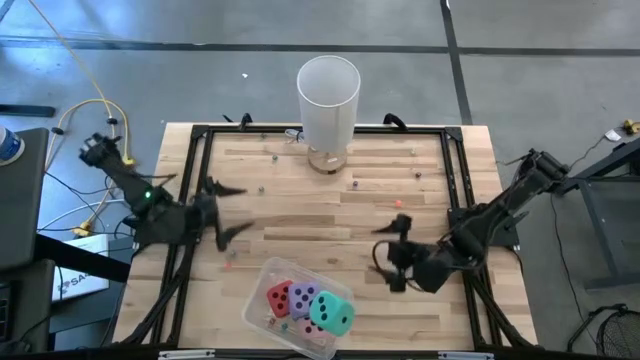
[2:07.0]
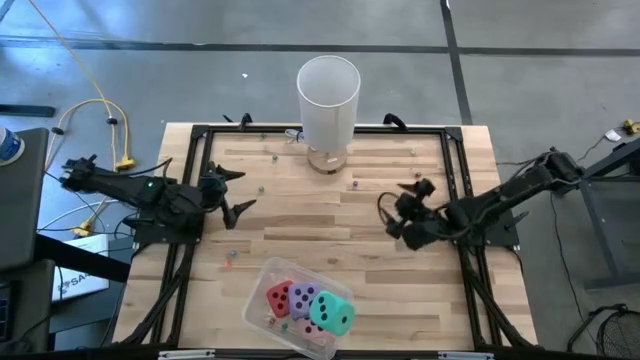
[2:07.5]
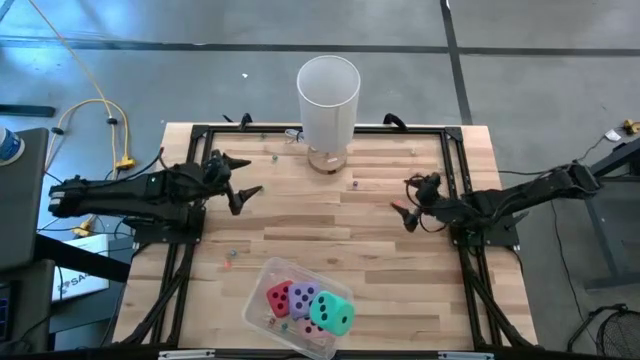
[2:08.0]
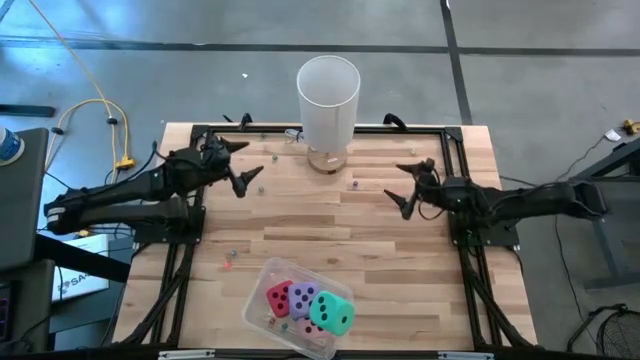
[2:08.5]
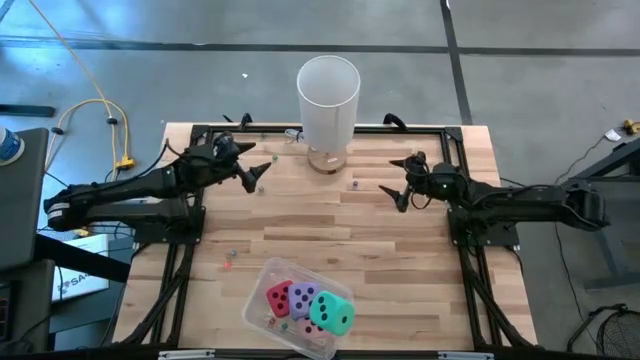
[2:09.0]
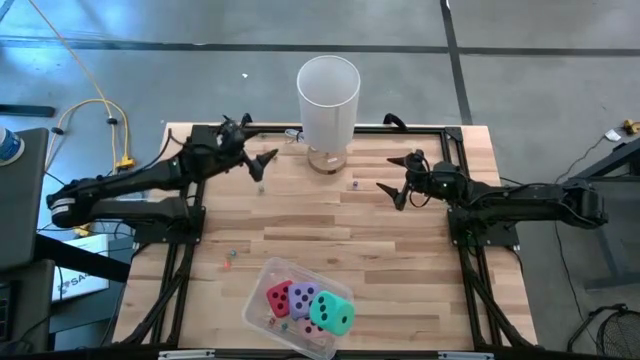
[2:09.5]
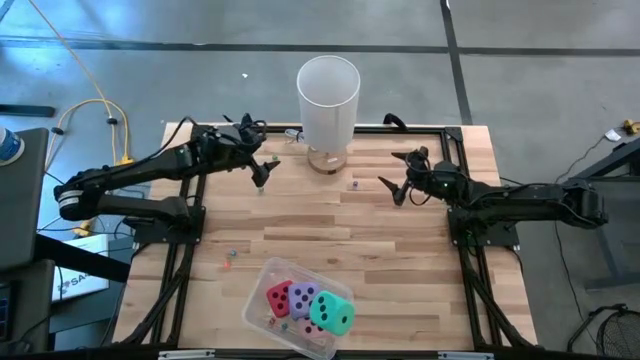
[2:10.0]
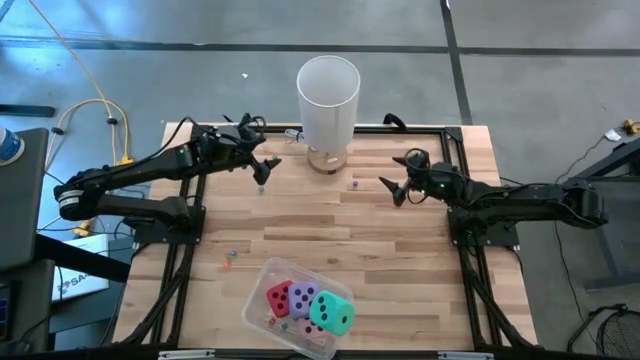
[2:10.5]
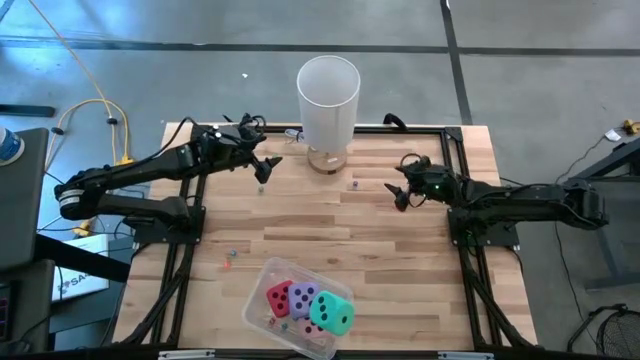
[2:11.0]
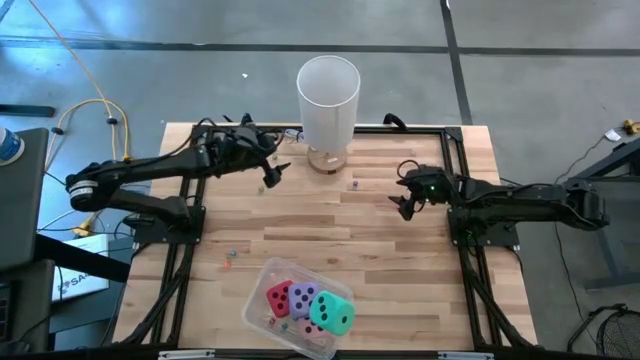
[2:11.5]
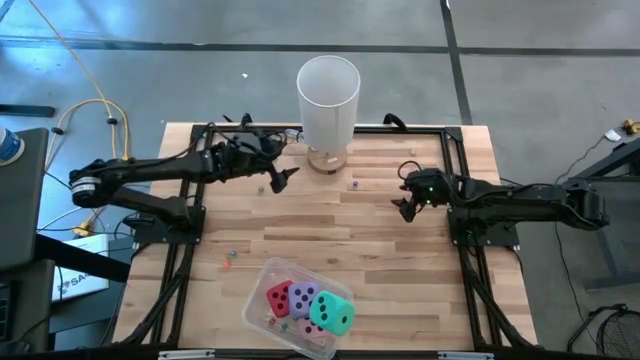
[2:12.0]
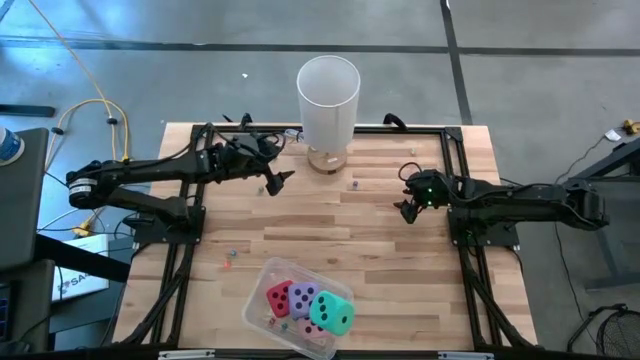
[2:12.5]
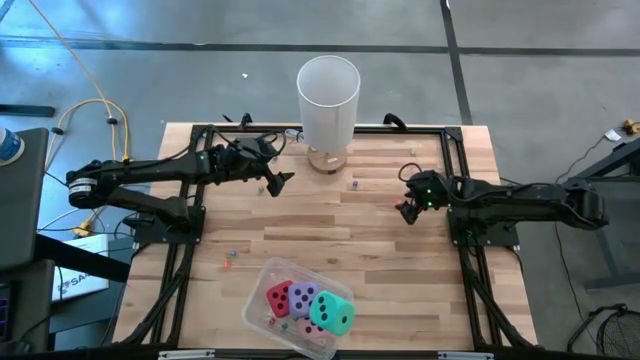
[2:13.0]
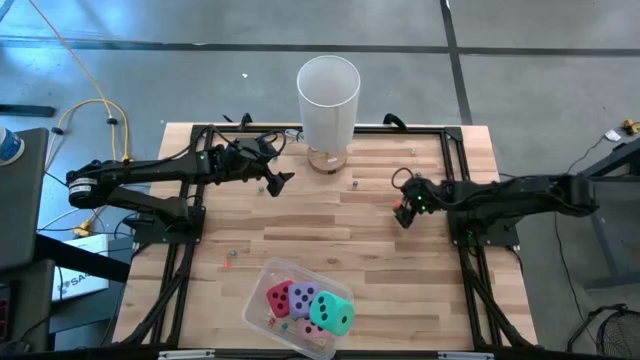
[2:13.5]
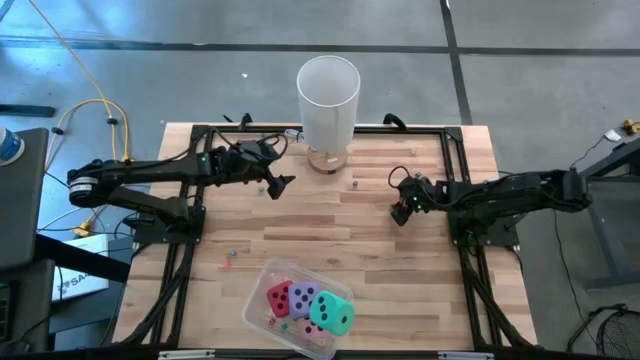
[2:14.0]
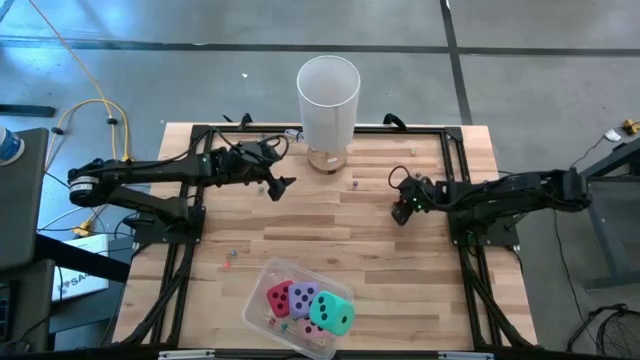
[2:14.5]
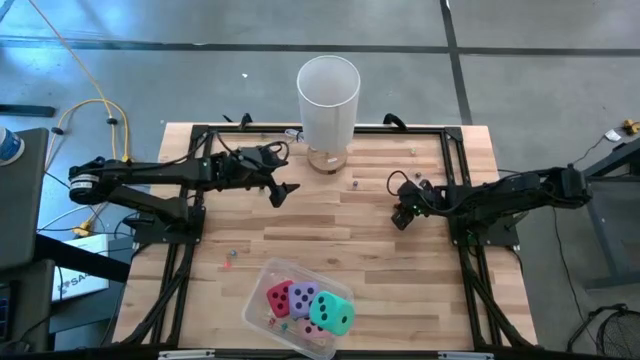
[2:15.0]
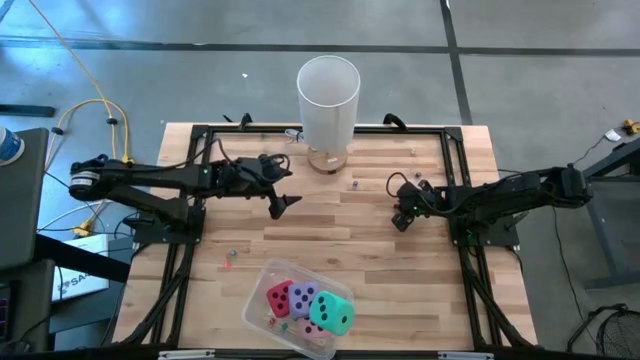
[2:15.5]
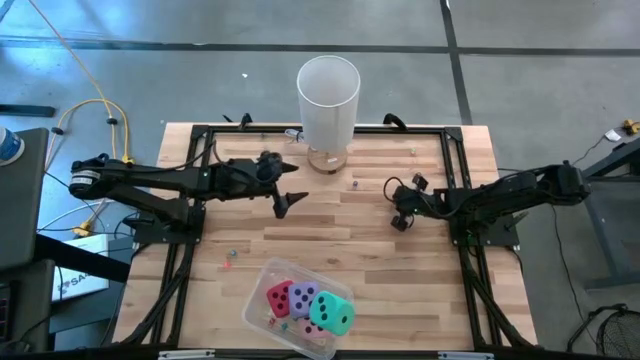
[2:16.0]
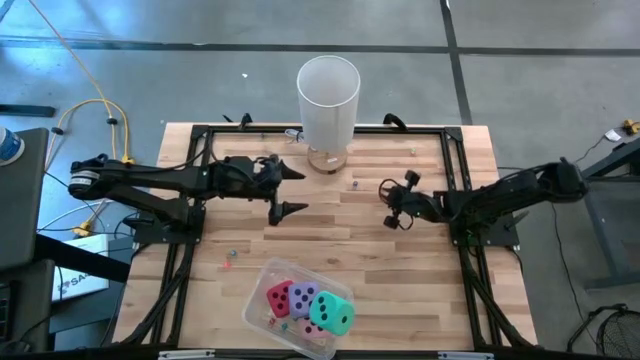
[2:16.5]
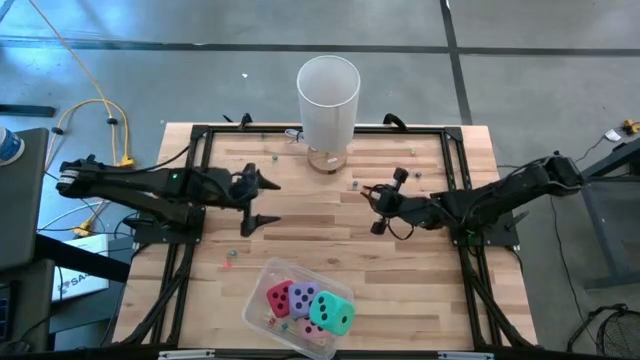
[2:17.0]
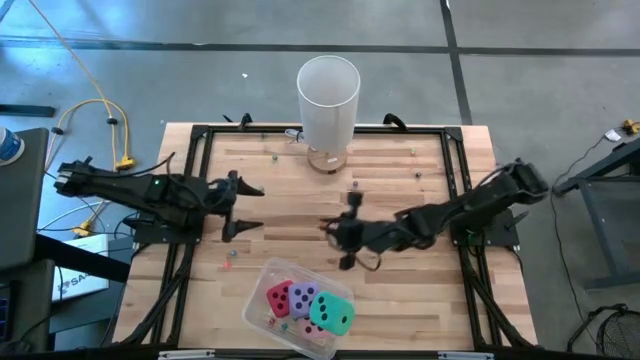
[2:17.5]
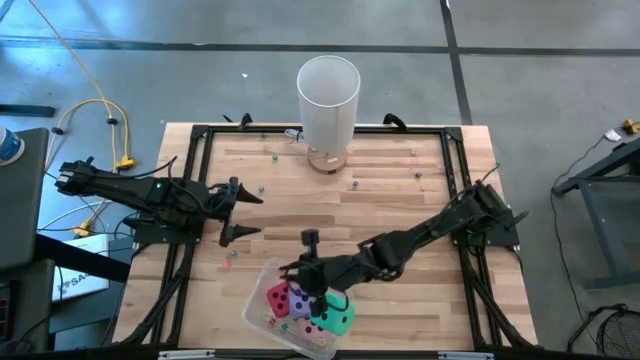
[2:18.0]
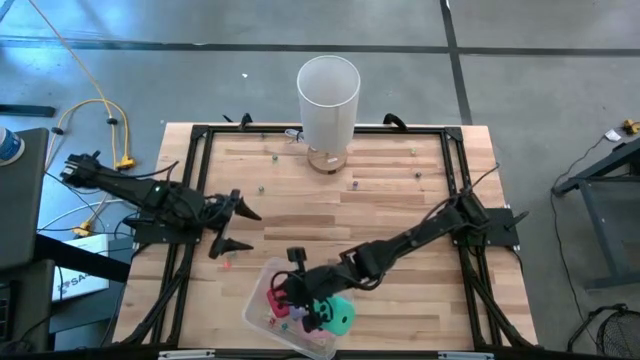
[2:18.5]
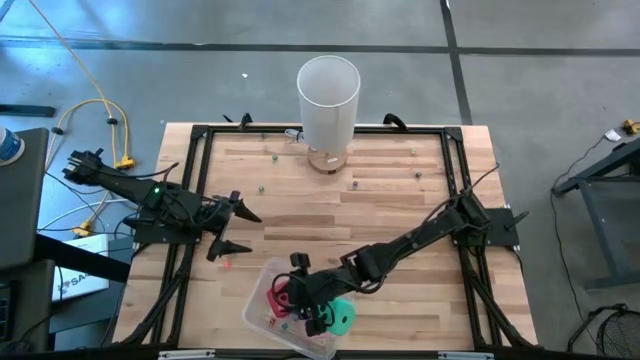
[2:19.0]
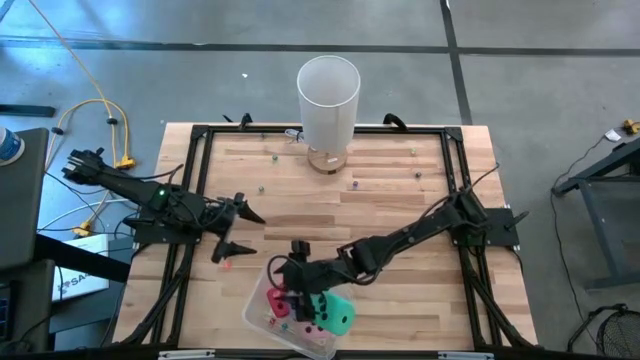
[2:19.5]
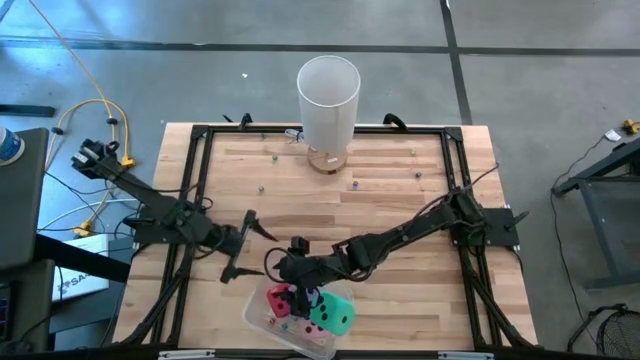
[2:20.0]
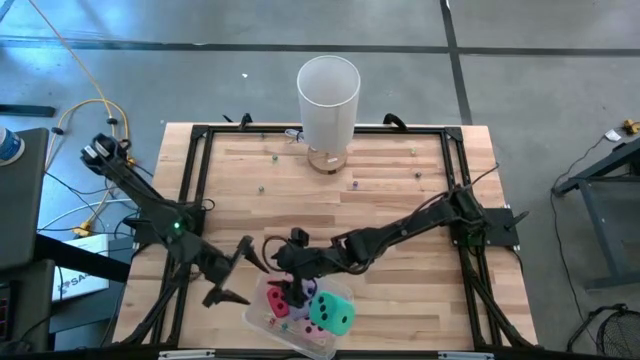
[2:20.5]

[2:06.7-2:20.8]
Task: Pick & Place Dice
Put the small orange dice into the transparent bin

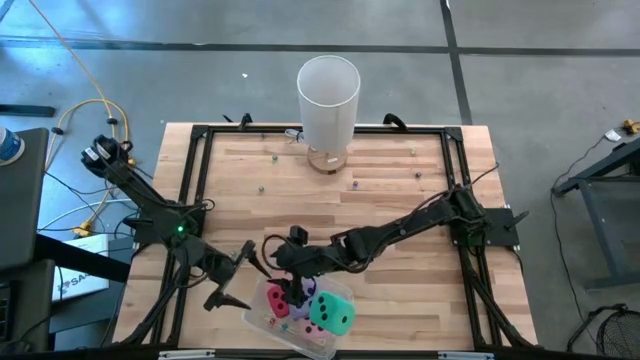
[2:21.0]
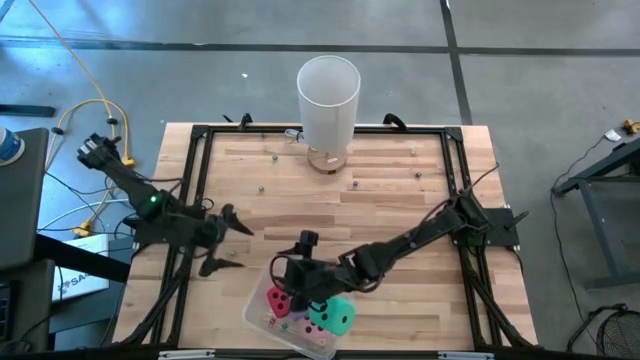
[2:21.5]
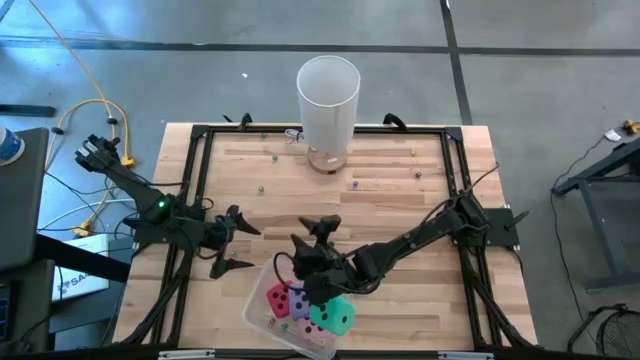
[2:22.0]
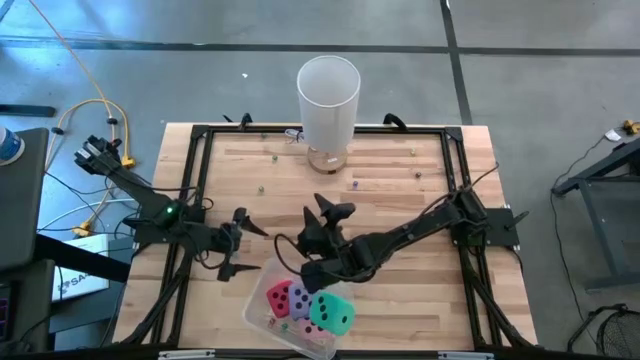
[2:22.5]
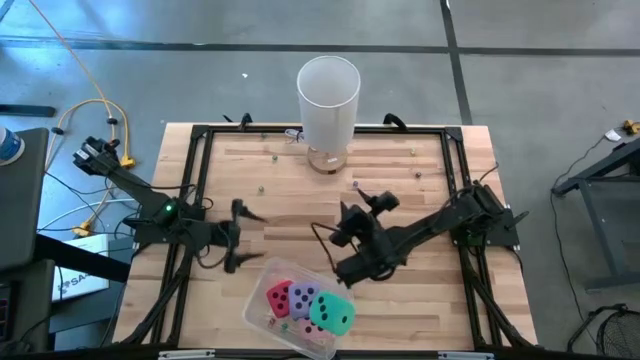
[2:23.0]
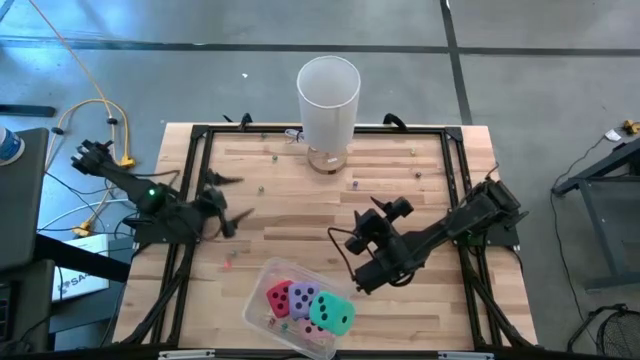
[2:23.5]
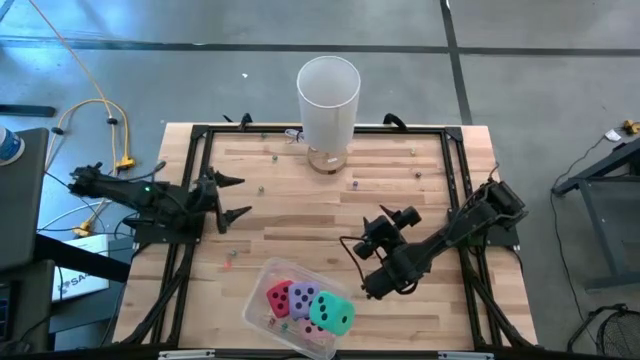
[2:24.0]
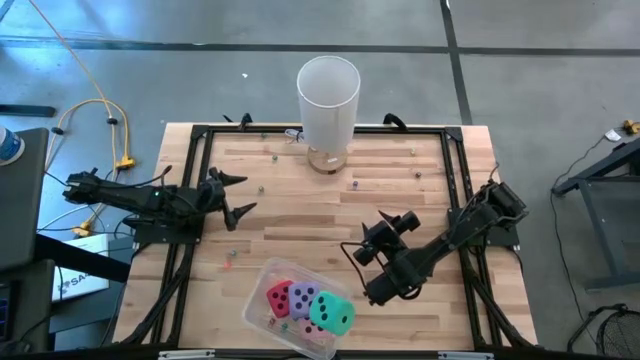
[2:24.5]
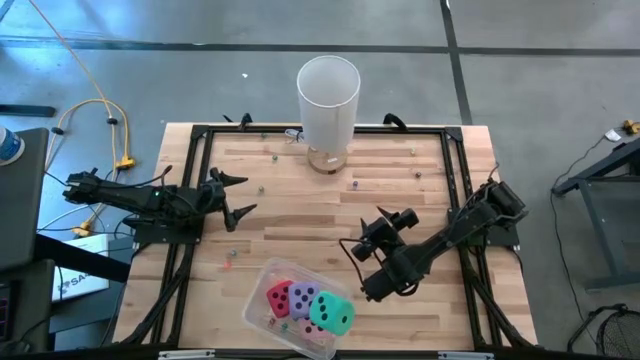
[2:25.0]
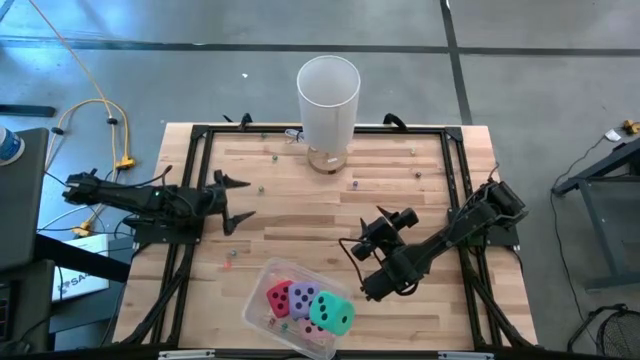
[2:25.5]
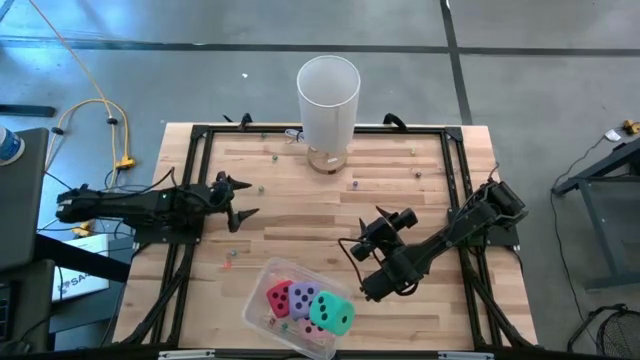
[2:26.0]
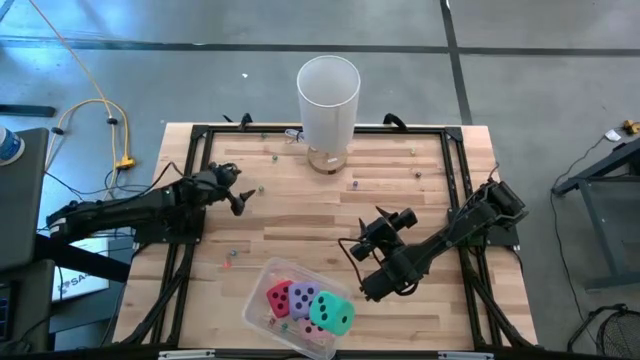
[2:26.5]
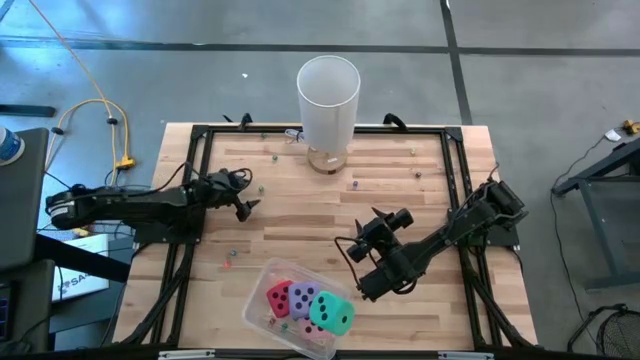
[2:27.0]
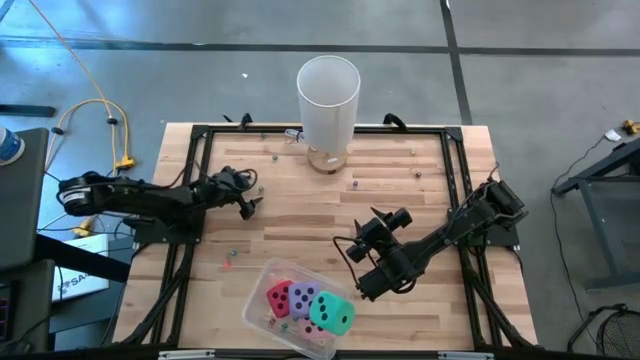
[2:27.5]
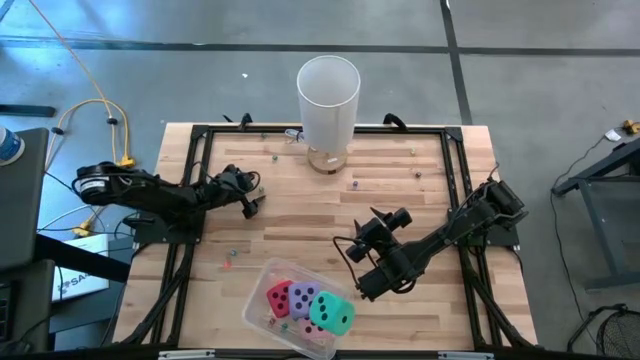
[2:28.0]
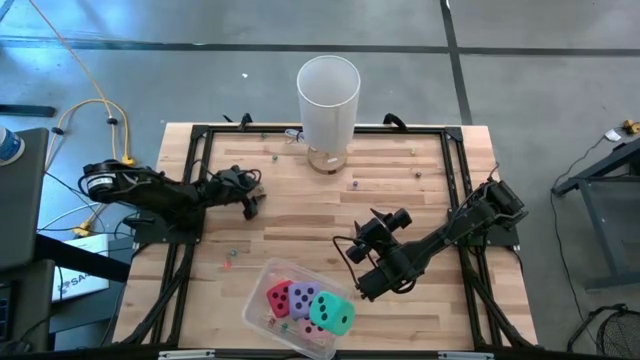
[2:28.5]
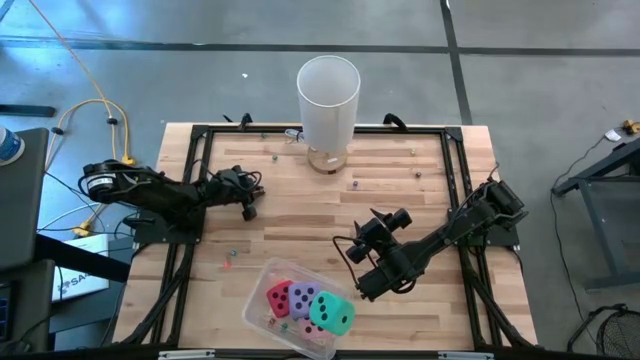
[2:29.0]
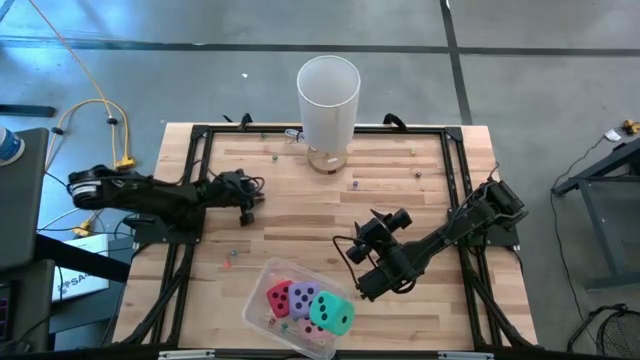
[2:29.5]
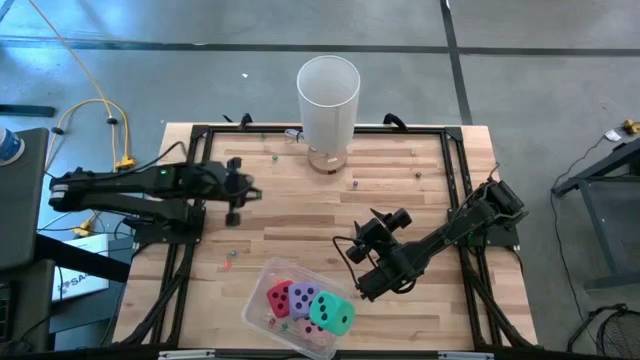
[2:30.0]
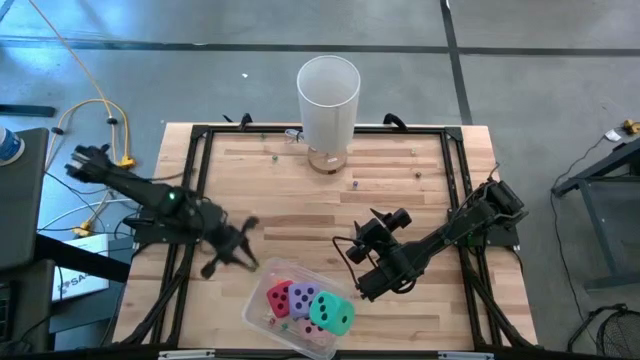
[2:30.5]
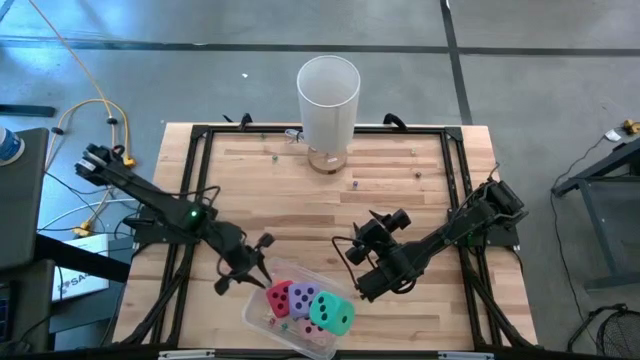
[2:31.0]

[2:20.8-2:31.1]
Put the small green dice into the transparent bin
